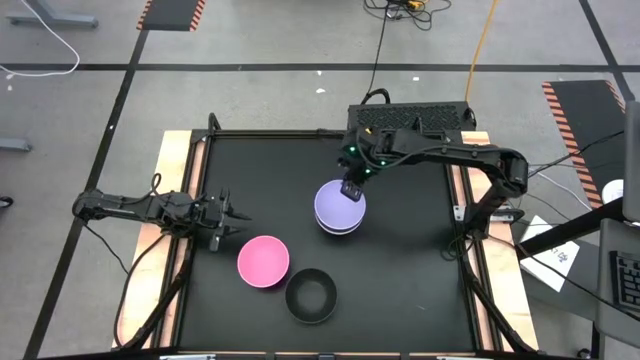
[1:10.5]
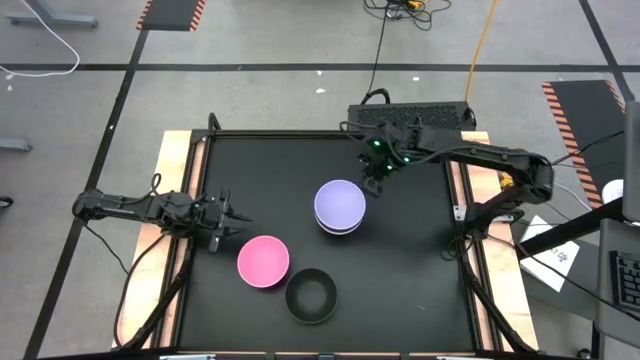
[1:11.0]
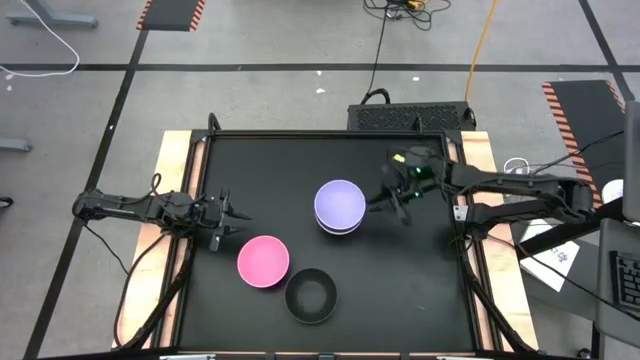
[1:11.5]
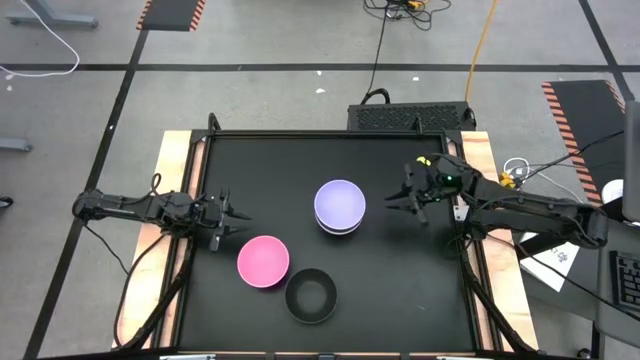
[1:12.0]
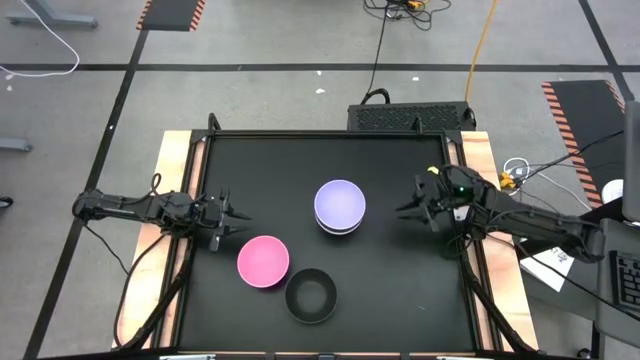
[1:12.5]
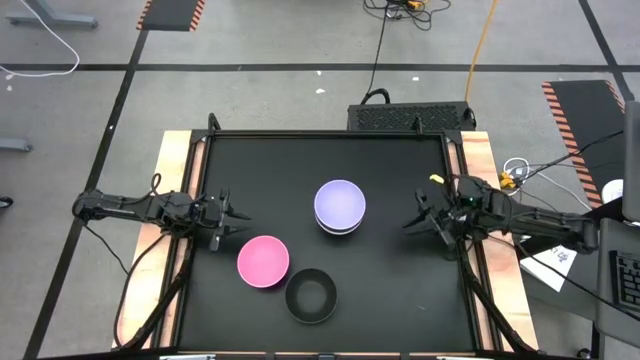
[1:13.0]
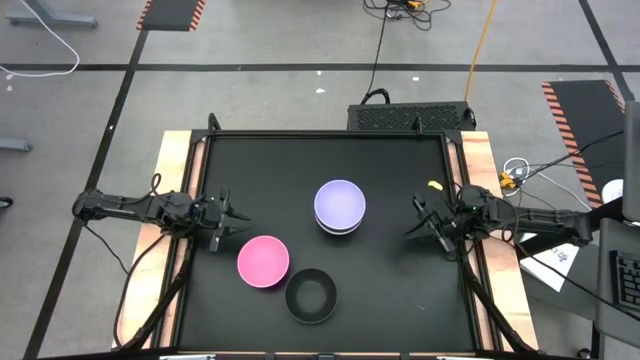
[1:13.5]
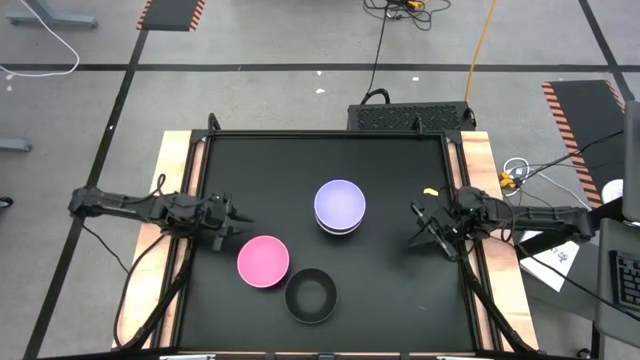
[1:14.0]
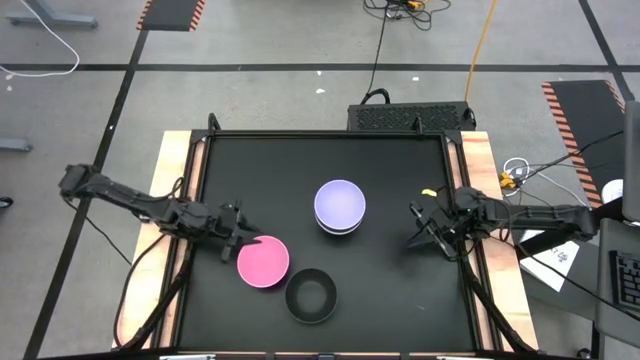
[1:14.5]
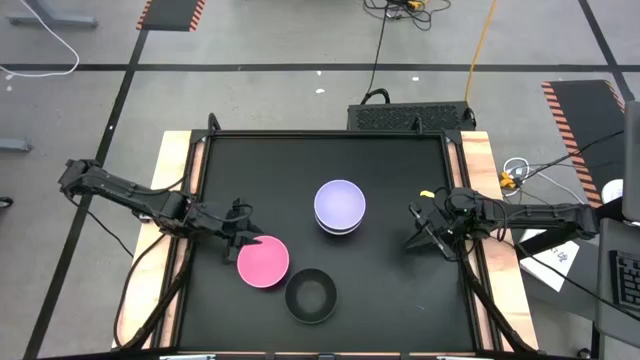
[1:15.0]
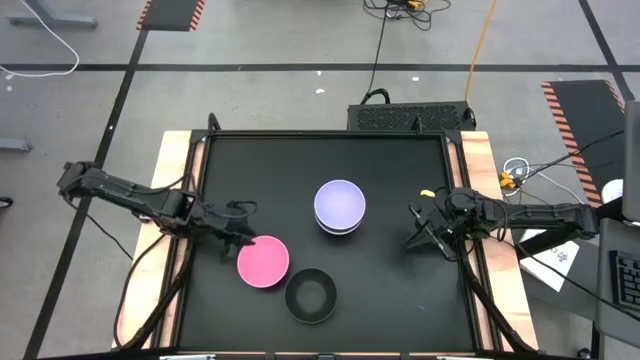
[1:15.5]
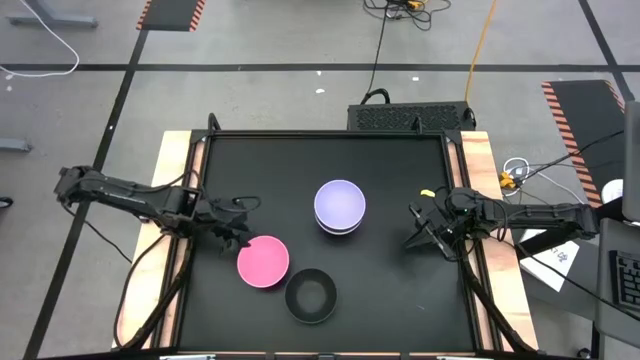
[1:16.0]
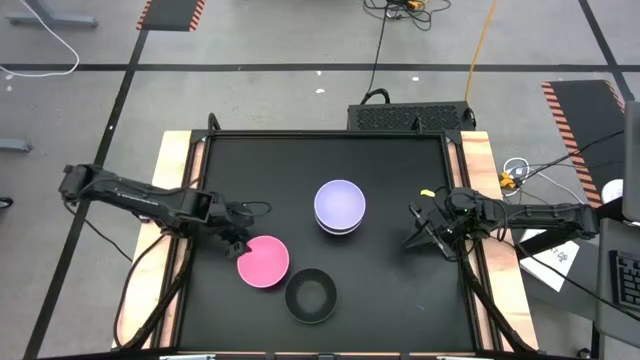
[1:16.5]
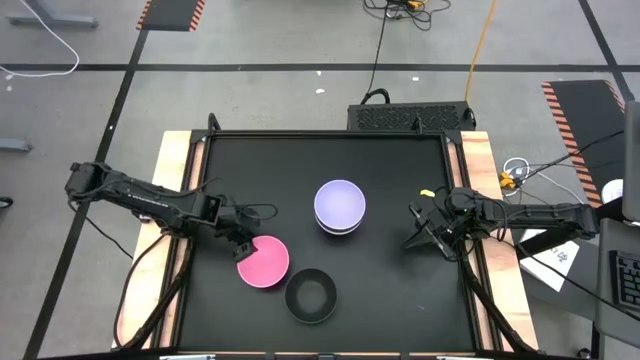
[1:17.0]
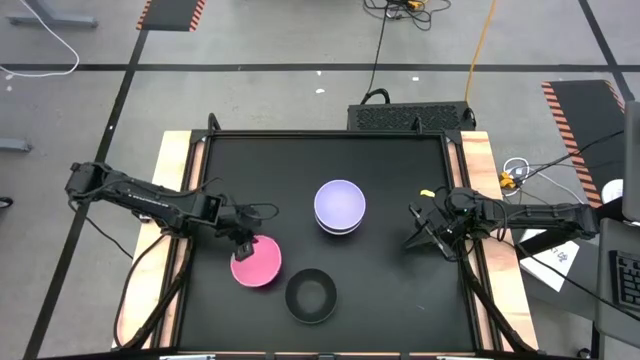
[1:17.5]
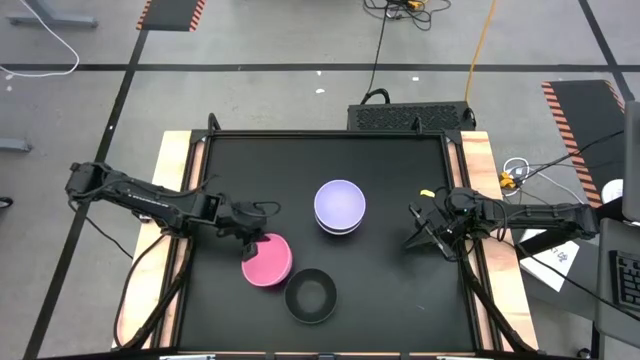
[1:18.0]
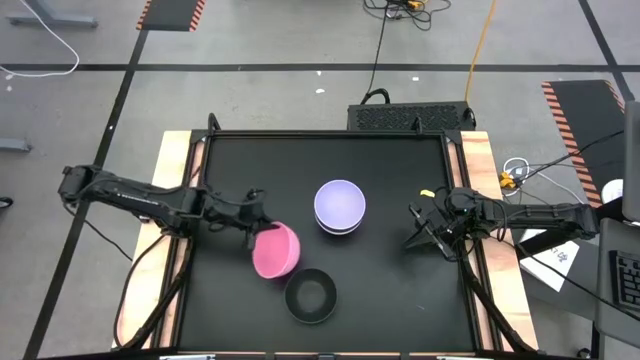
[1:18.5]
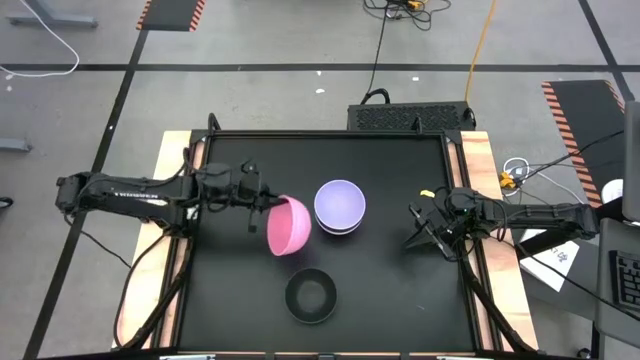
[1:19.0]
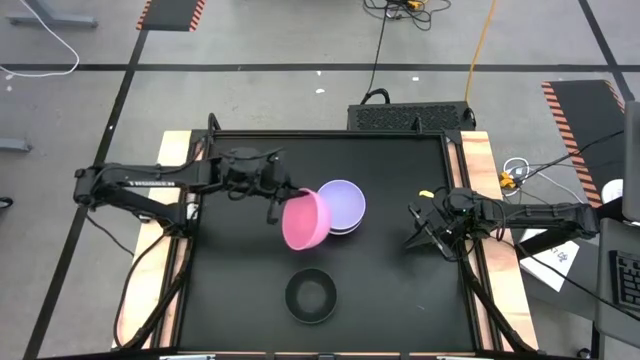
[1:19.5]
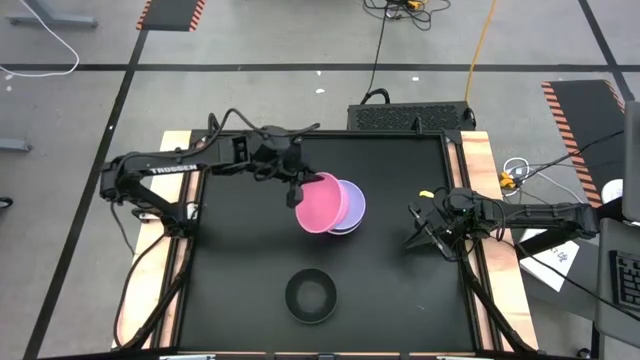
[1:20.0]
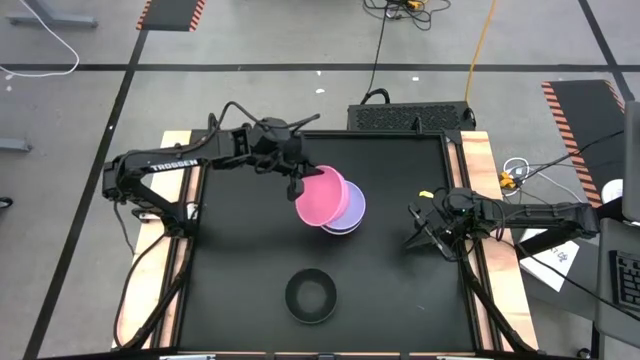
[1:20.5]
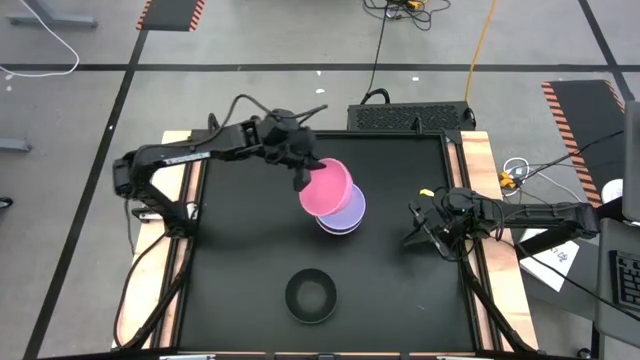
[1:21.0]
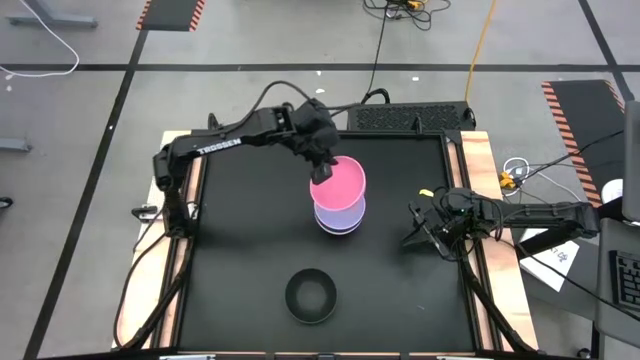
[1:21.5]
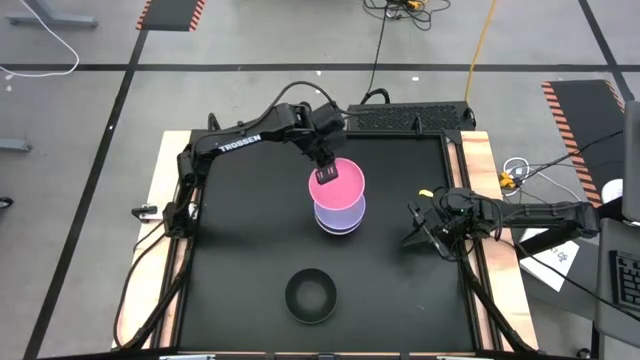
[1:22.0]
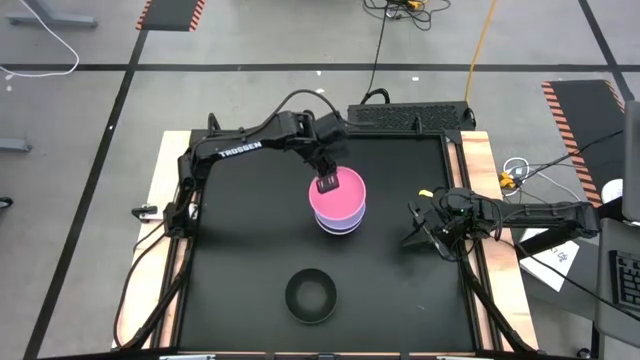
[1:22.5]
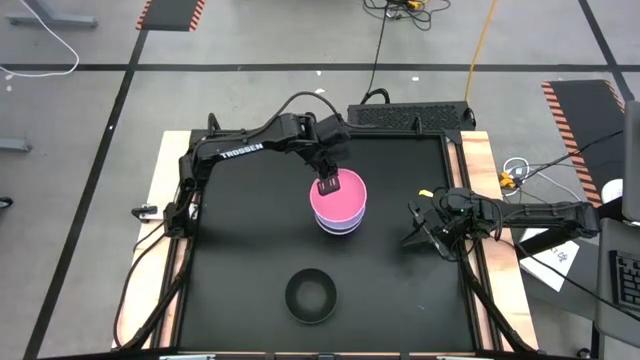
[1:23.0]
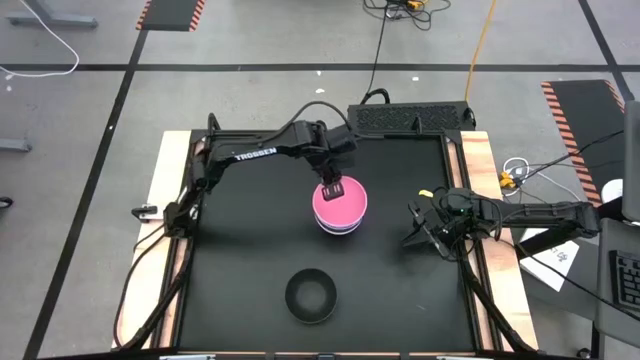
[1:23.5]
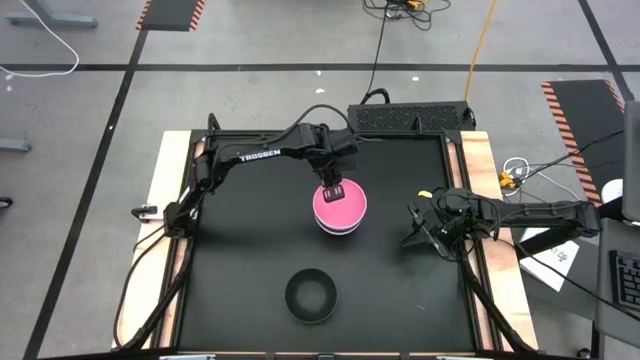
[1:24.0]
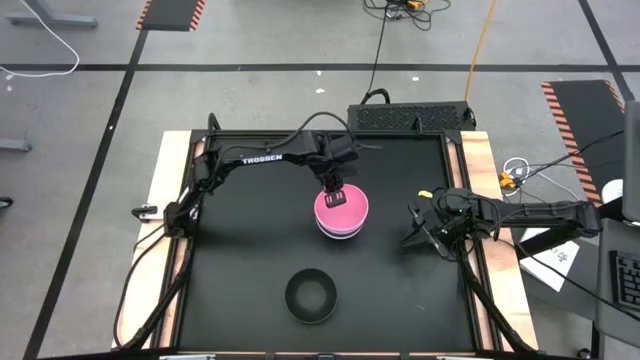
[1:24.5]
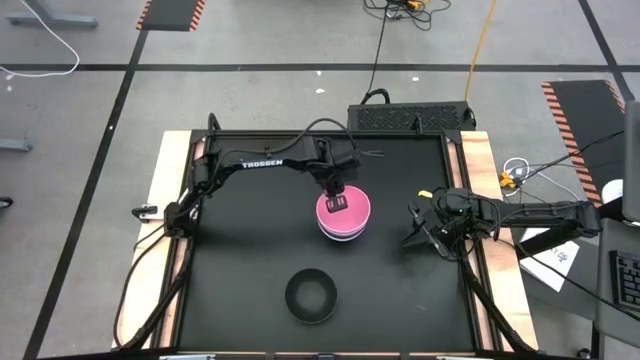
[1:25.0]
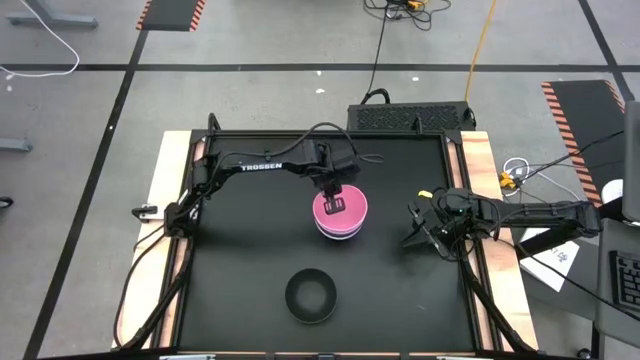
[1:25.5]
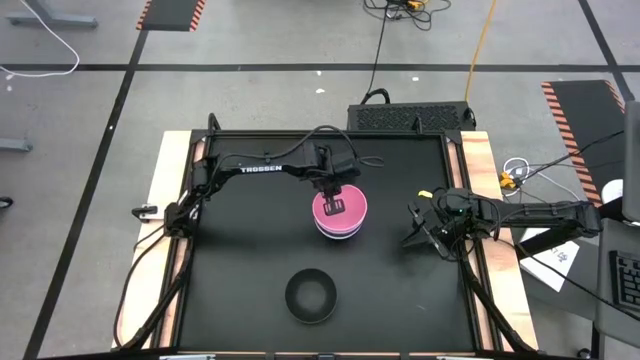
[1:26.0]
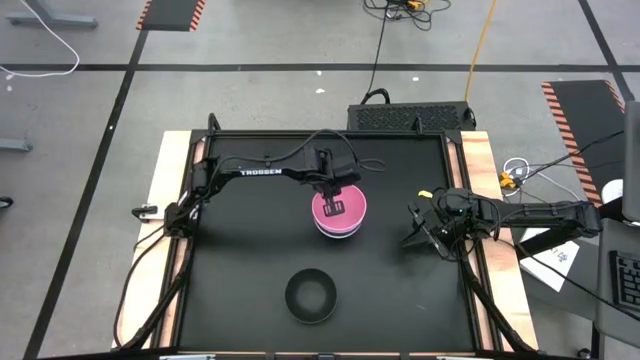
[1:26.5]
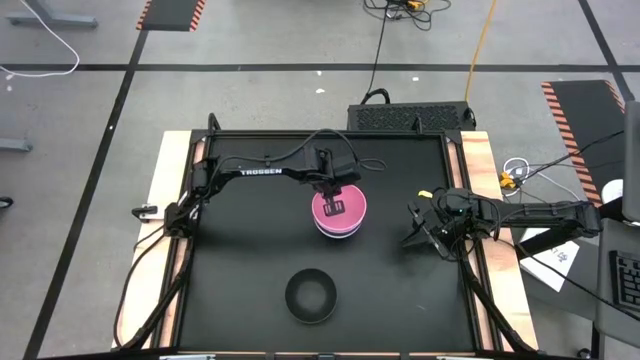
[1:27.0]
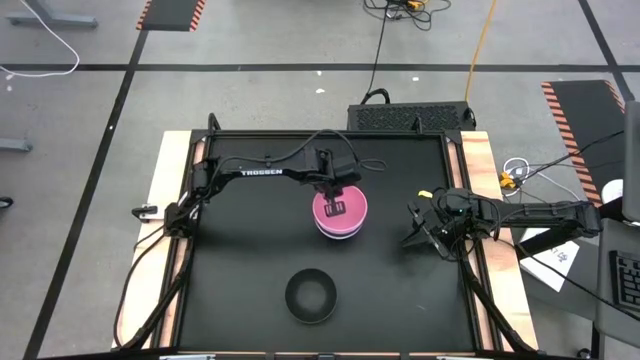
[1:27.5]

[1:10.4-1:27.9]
Task: Nest bowls inside each other
Stack the pink bowl on top of the purple bowl
